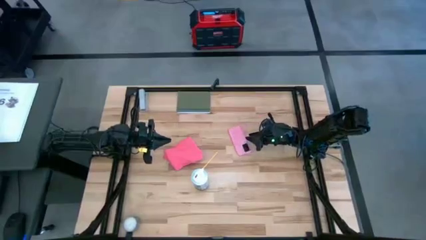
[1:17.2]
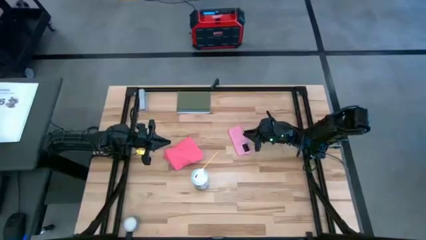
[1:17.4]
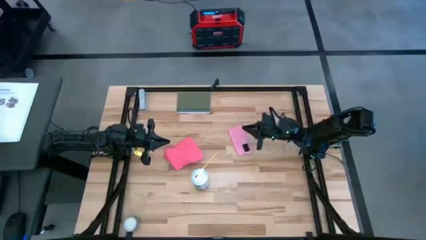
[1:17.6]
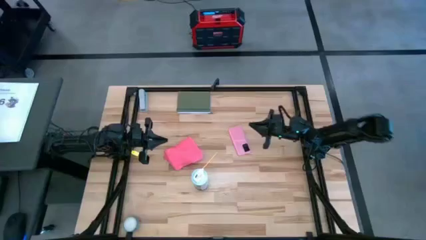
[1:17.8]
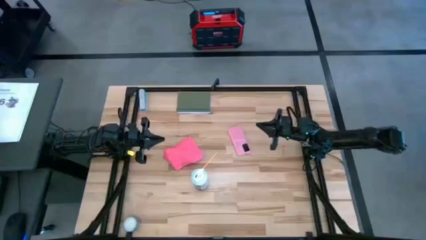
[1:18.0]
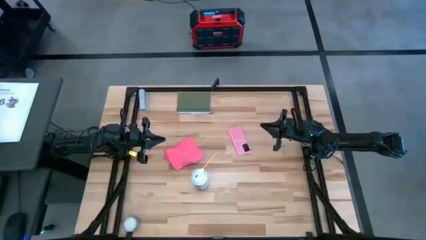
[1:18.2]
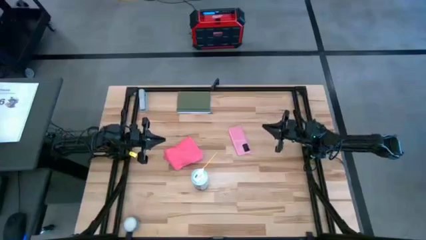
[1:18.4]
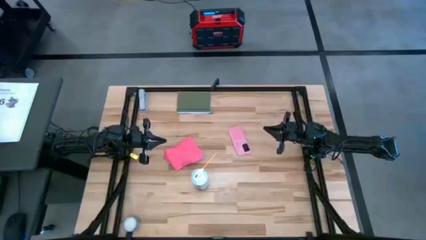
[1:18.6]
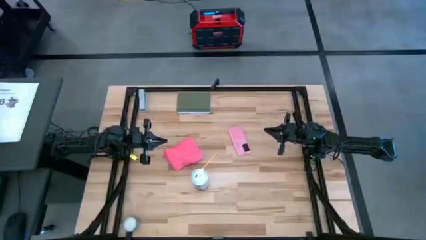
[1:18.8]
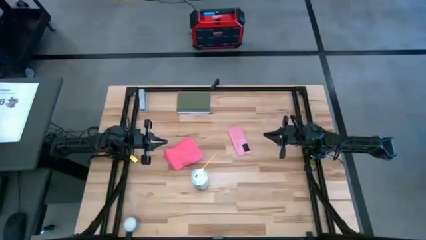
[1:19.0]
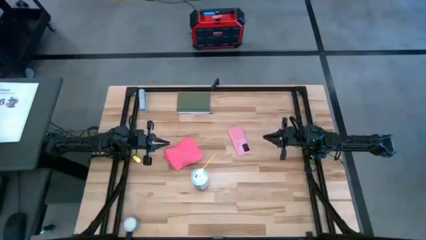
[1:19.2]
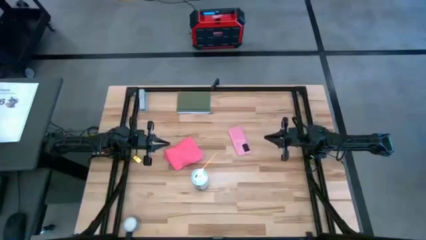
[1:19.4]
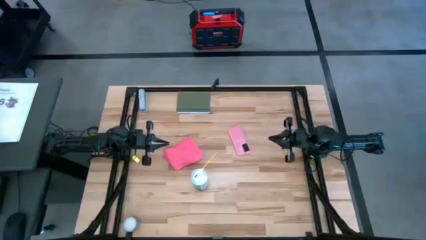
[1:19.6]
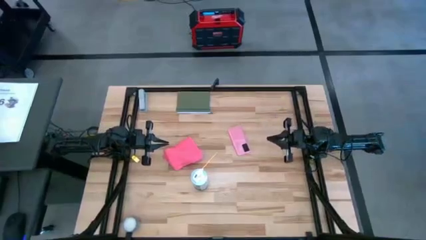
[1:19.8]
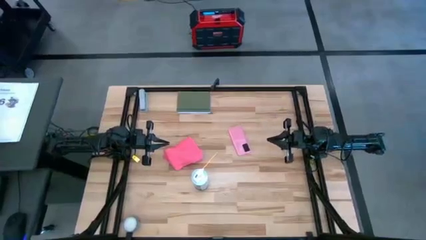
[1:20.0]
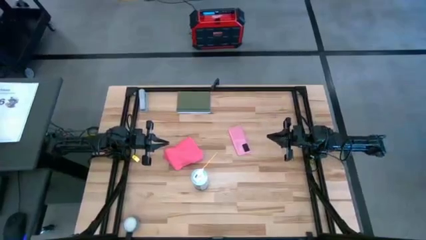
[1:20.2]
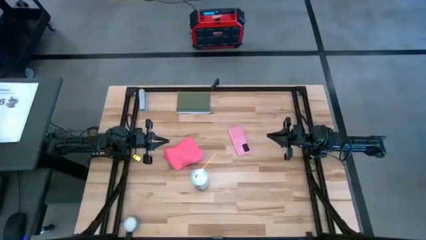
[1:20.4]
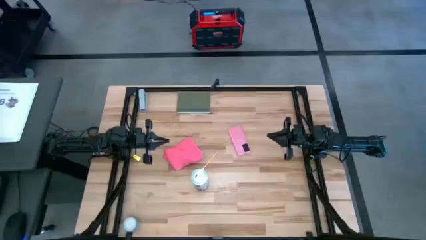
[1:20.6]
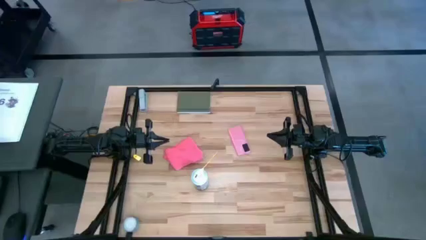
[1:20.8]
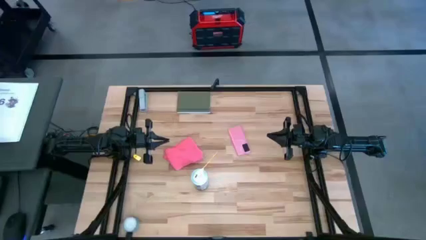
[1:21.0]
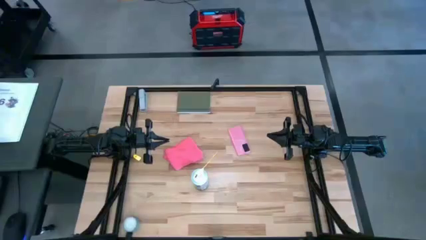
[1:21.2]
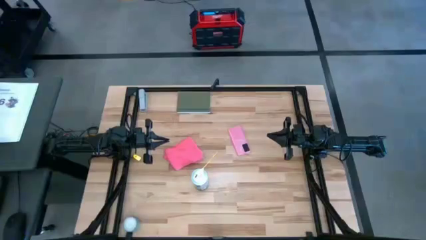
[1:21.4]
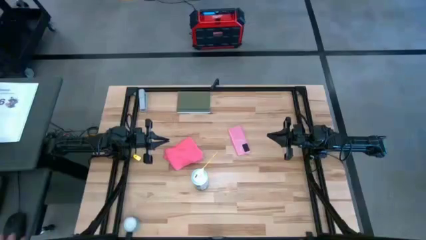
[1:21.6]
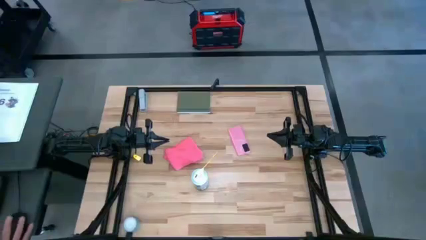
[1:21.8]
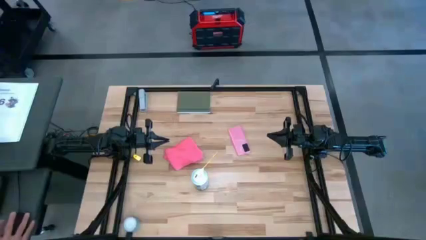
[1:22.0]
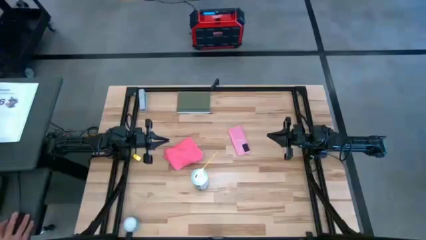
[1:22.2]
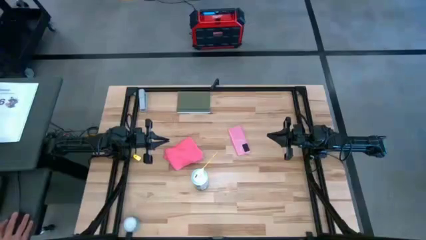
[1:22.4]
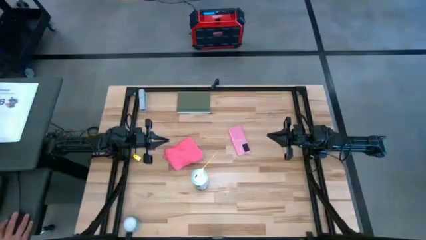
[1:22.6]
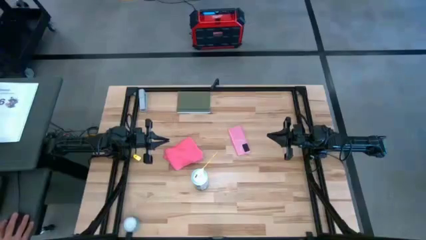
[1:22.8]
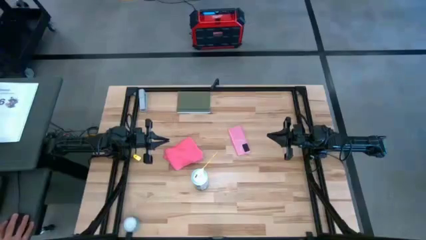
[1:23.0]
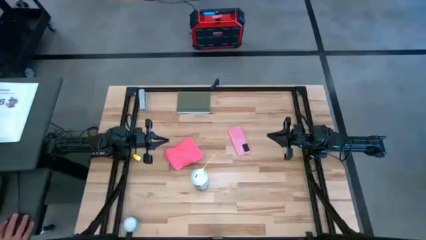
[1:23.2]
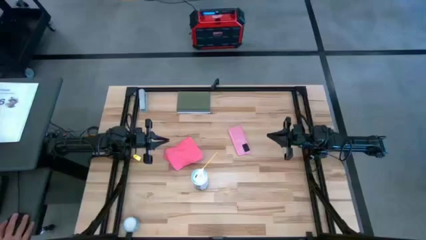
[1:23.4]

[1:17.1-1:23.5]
Task: Apply microfiber cloth
Return to Home Position

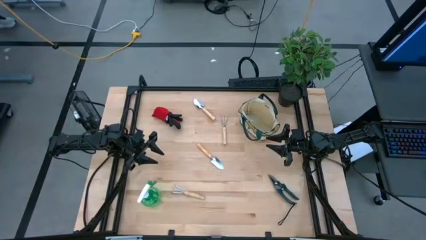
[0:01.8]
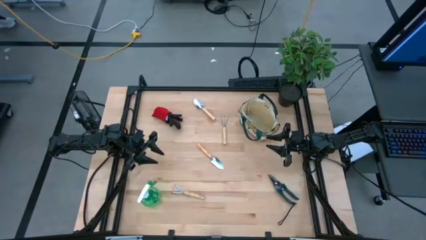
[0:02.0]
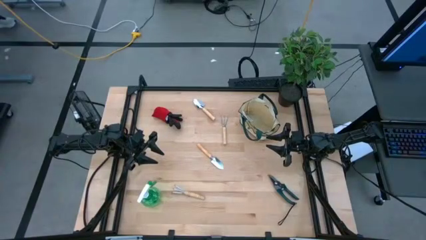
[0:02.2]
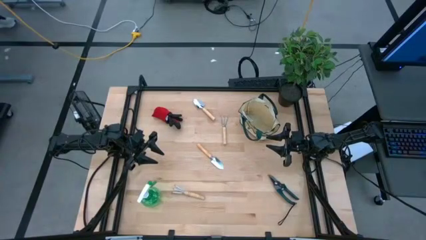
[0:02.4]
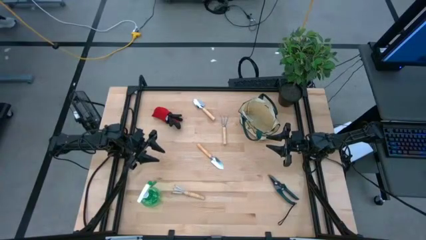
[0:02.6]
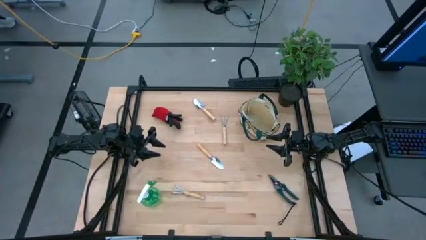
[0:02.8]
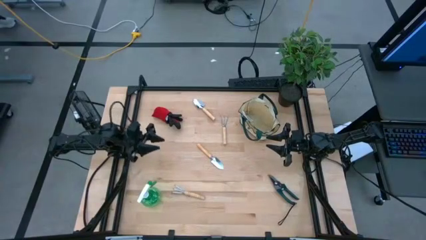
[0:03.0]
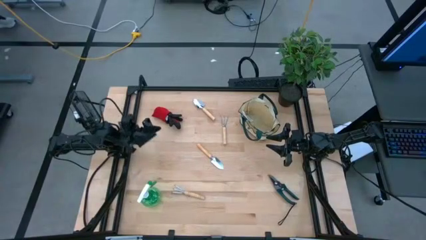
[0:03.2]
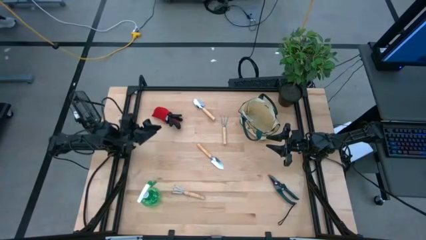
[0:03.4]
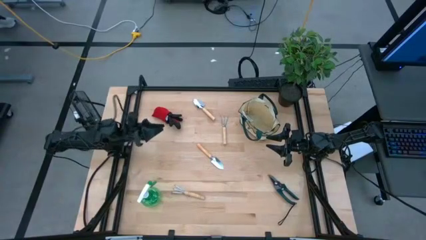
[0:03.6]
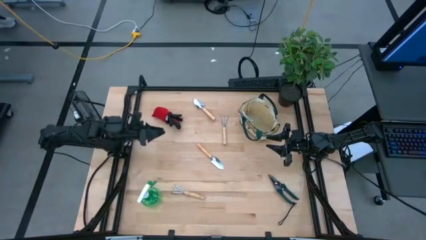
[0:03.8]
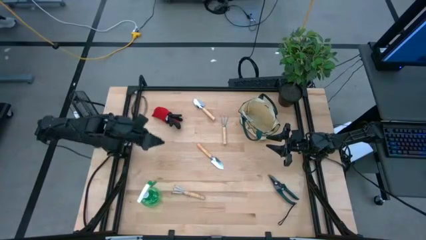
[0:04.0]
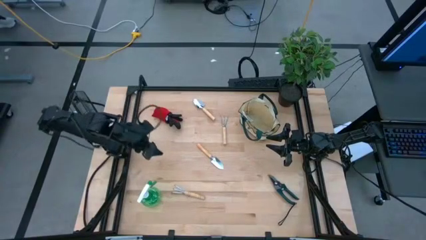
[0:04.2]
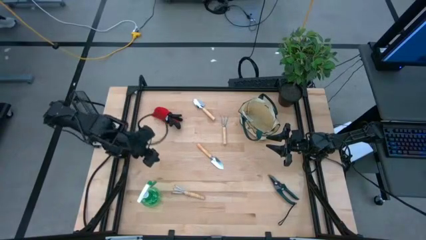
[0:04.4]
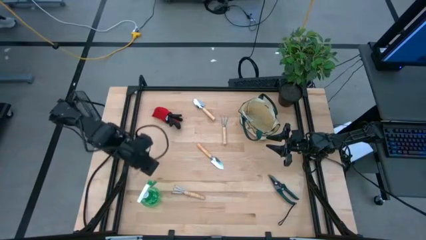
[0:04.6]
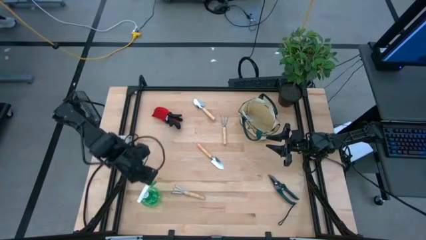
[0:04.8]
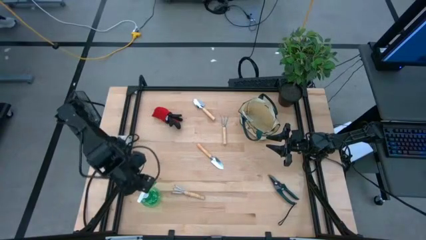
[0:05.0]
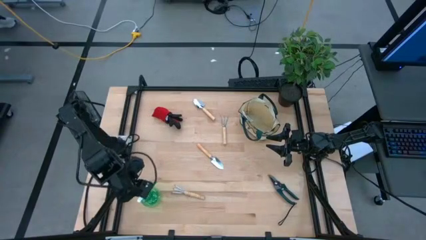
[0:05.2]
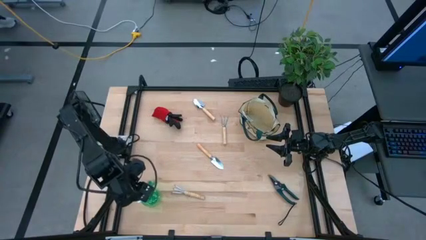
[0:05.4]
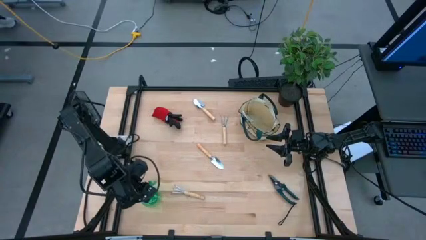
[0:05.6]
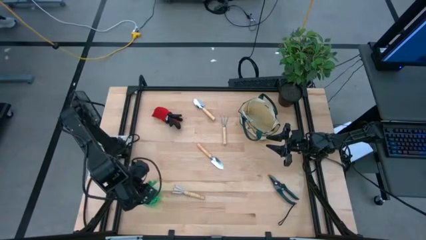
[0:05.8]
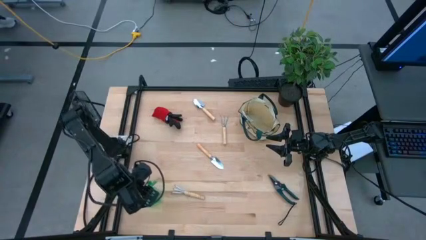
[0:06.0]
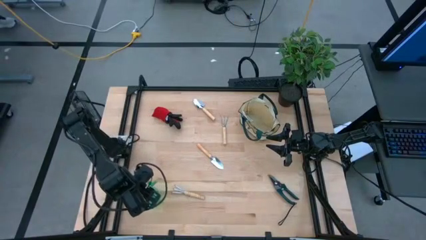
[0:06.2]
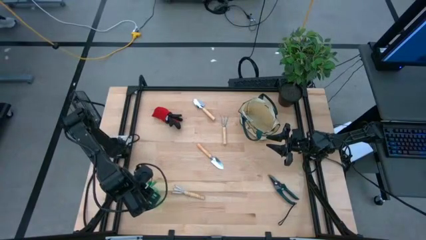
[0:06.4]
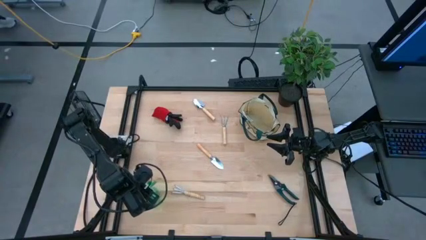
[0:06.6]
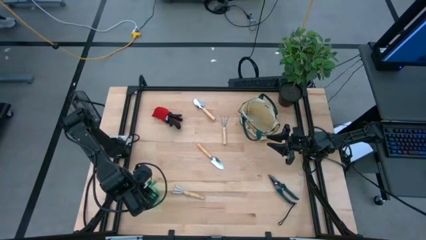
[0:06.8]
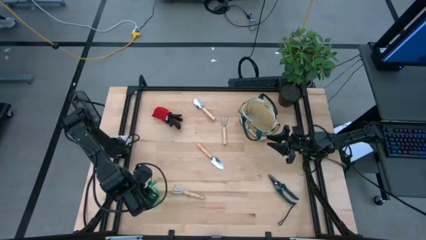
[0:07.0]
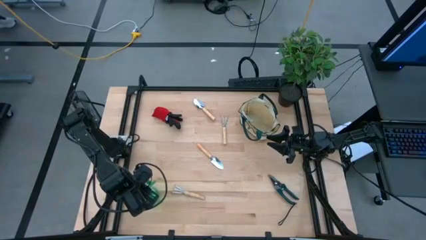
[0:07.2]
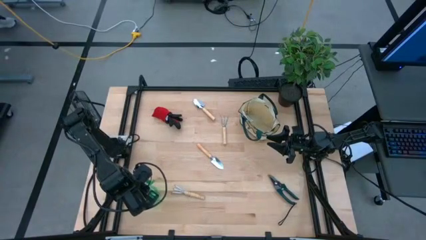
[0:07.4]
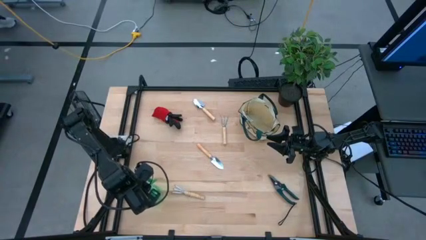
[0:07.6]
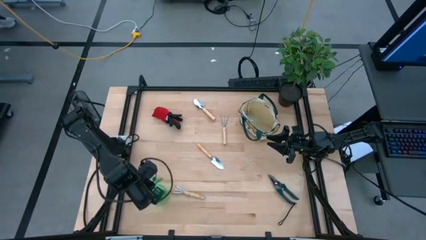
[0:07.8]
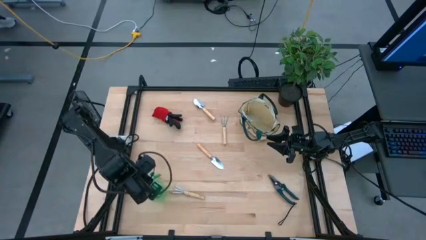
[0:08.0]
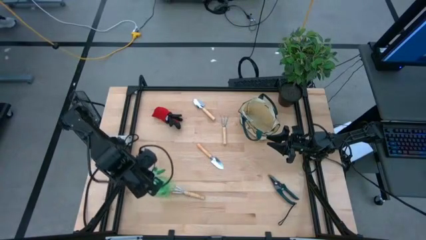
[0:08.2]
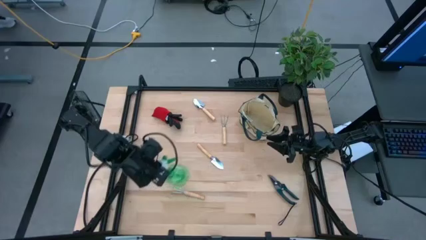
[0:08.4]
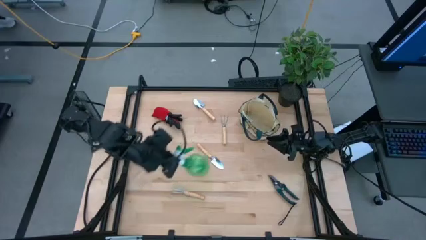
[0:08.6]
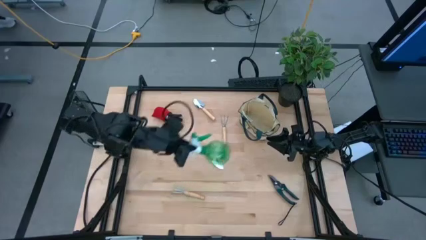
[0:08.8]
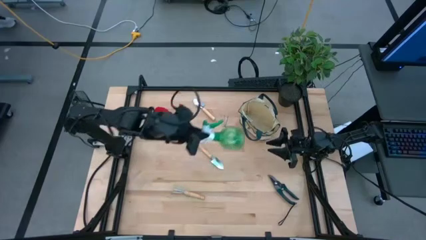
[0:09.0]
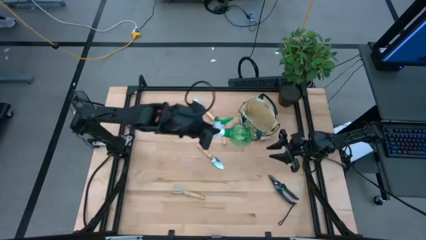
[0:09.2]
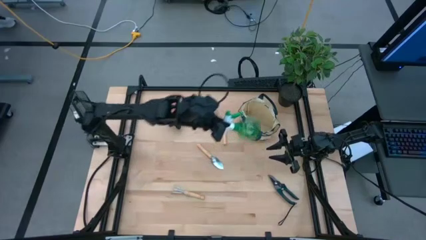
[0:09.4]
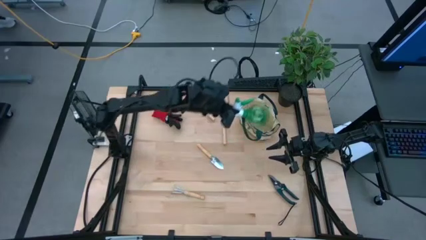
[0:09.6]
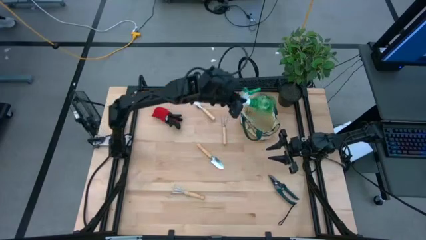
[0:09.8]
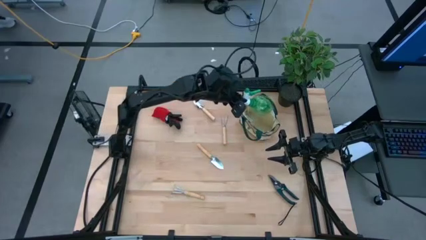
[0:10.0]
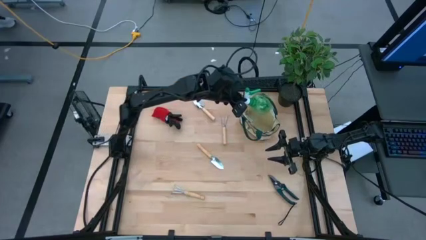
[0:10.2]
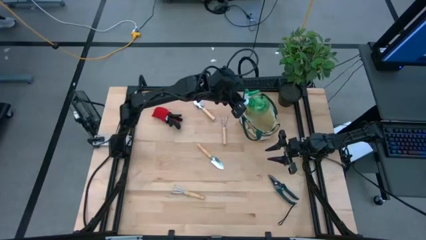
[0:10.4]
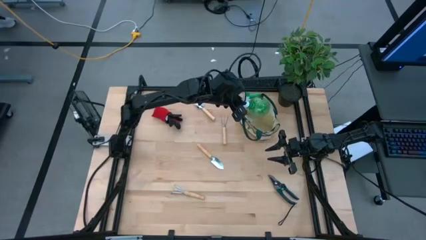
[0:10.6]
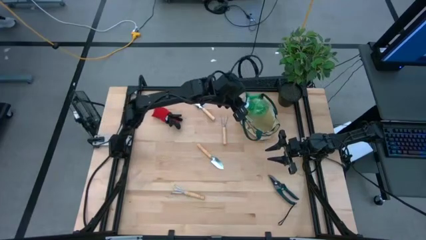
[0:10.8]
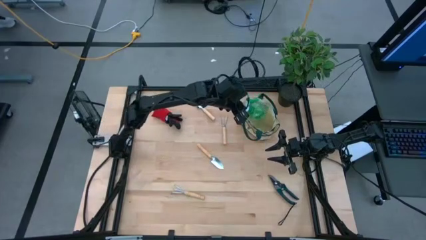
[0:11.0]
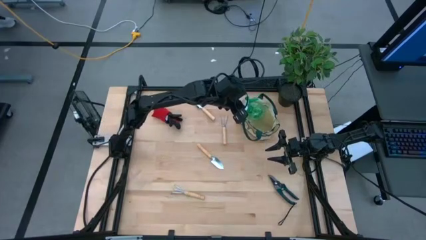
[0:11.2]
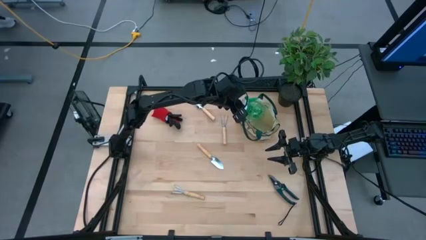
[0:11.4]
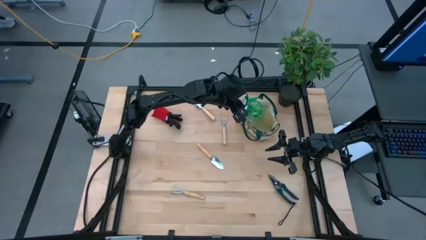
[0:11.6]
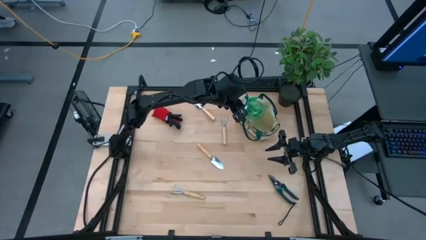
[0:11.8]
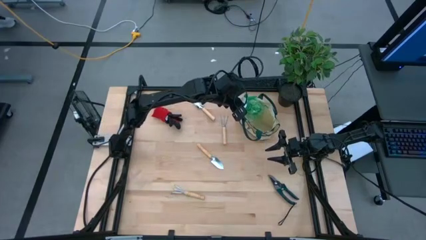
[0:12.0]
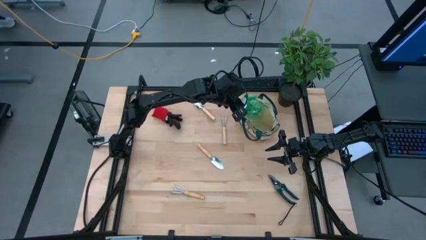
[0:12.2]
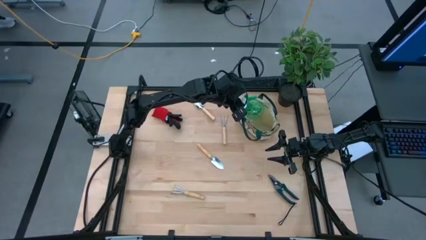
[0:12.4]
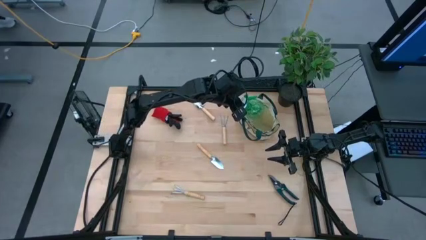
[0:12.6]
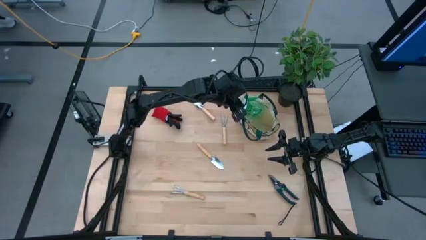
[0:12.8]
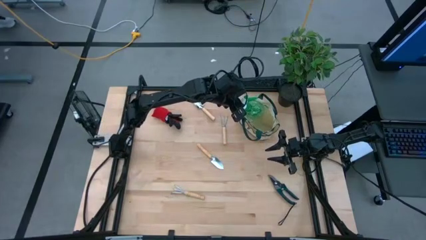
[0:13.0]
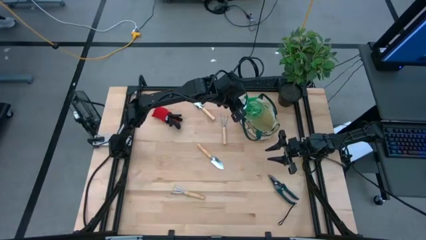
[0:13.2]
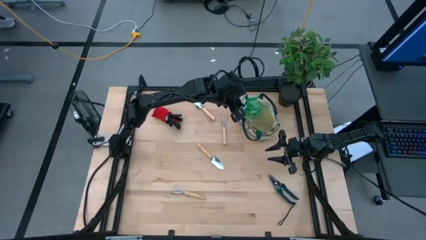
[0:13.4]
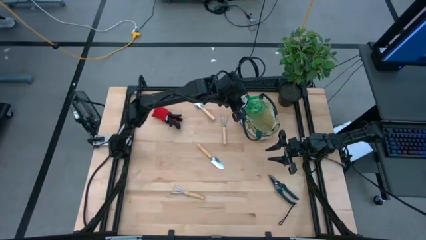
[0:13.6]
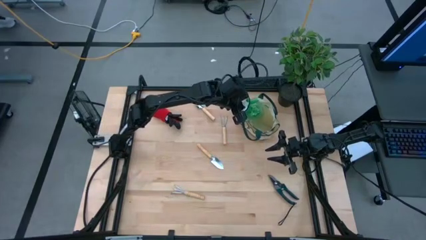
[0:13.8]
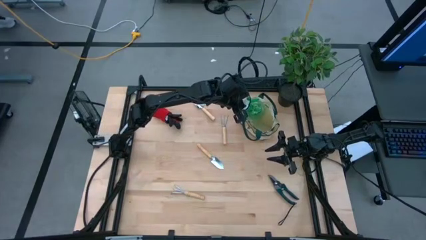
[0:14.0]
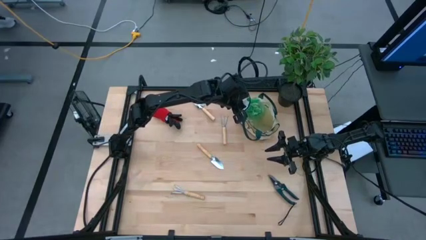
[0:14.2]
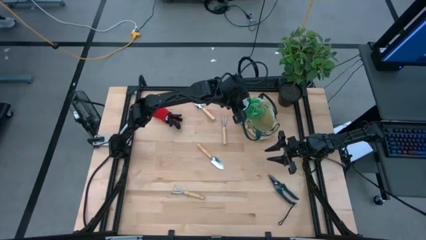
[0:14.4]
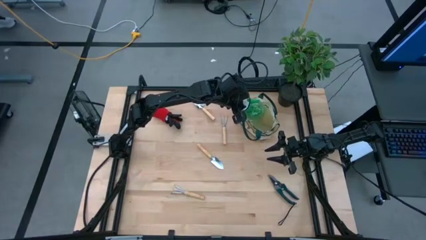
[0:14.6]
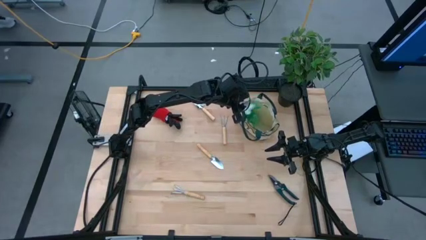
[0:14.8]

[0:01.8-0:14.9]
Task: Pick & Place Garden tools in Gardening bag
Put the green spray bottle into the gardening bag
